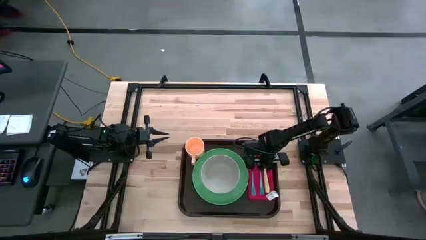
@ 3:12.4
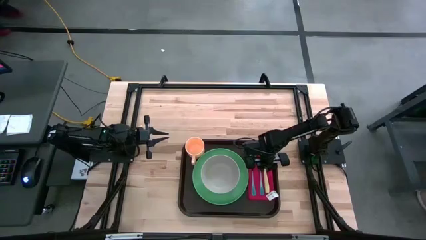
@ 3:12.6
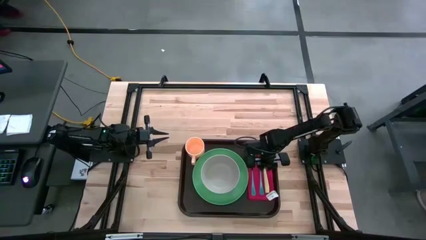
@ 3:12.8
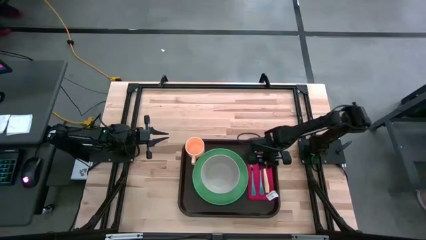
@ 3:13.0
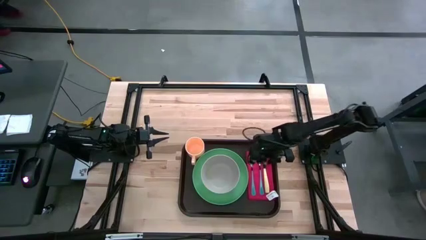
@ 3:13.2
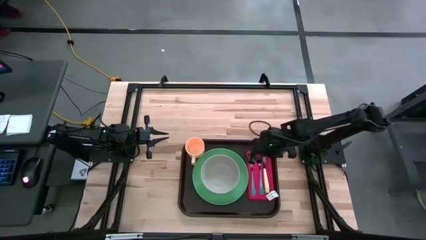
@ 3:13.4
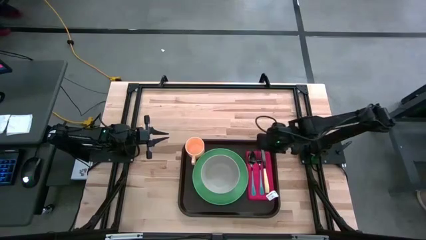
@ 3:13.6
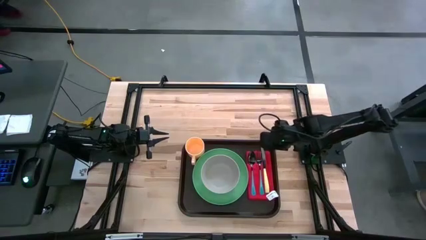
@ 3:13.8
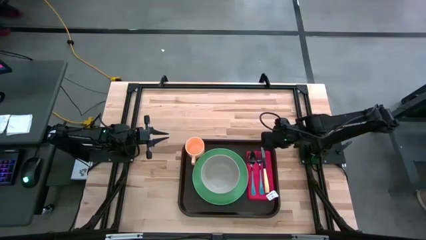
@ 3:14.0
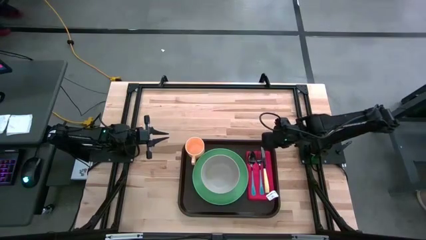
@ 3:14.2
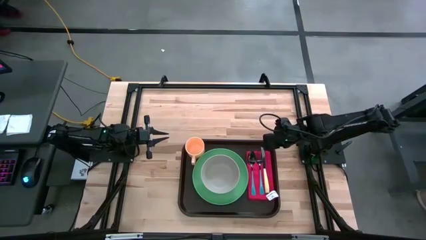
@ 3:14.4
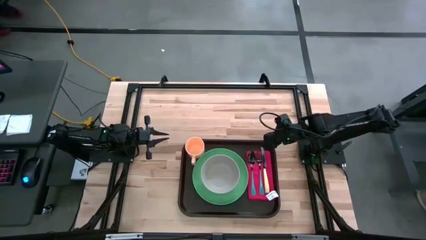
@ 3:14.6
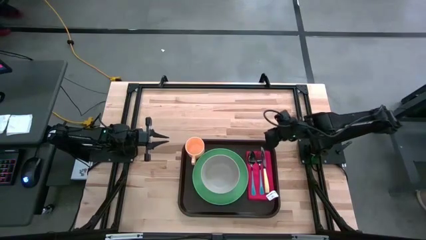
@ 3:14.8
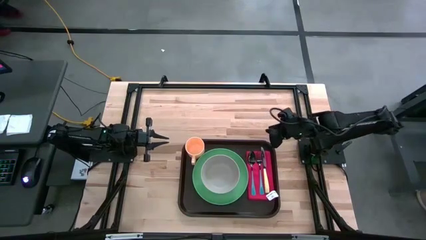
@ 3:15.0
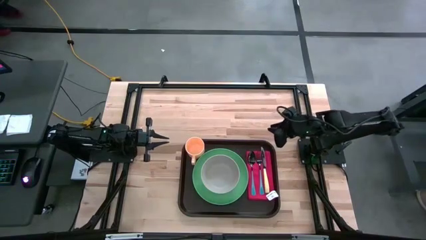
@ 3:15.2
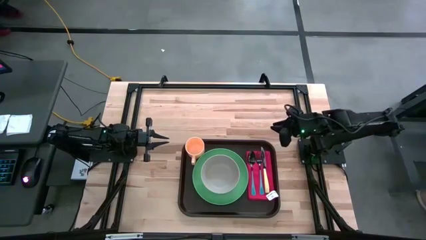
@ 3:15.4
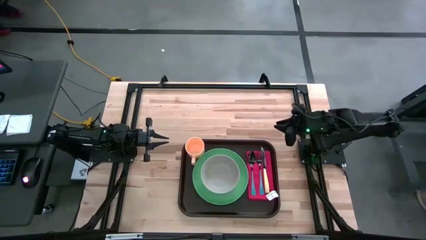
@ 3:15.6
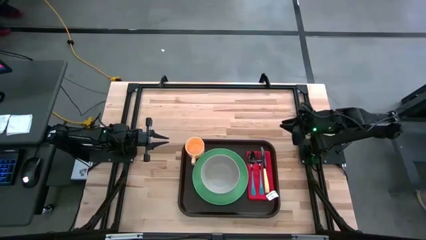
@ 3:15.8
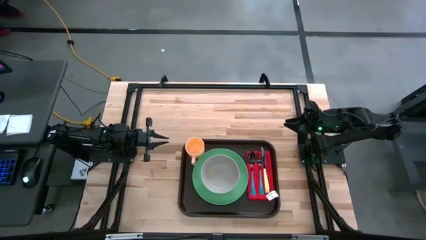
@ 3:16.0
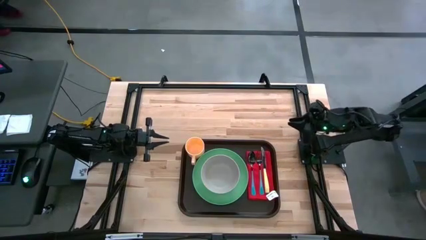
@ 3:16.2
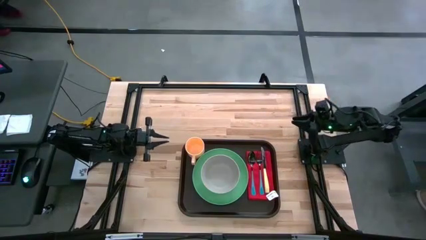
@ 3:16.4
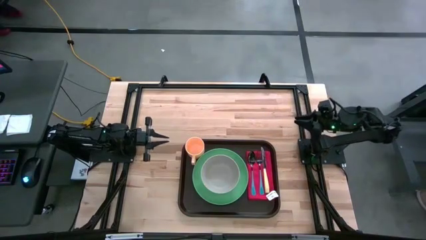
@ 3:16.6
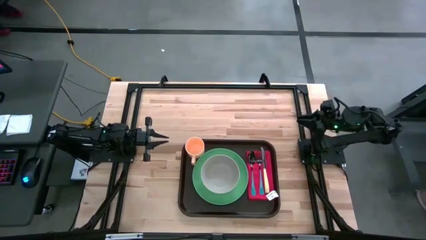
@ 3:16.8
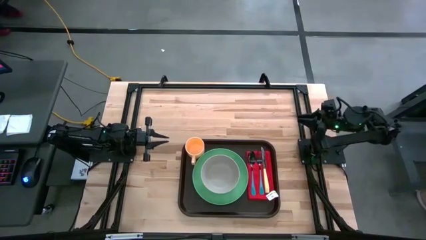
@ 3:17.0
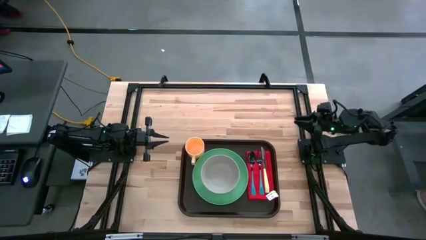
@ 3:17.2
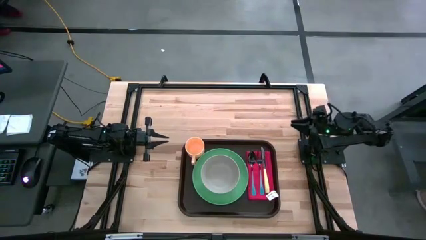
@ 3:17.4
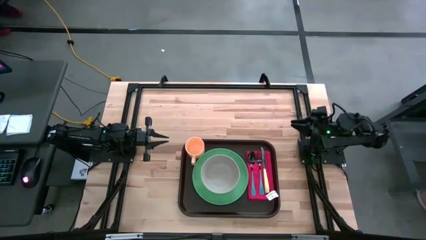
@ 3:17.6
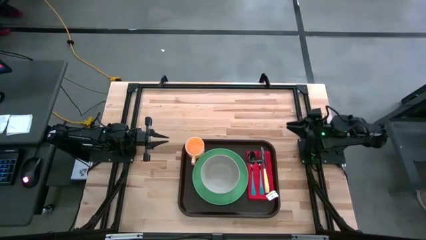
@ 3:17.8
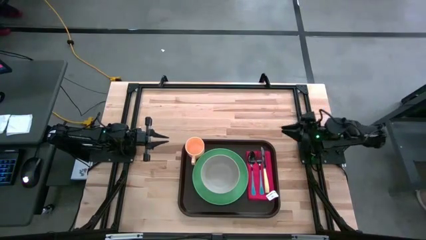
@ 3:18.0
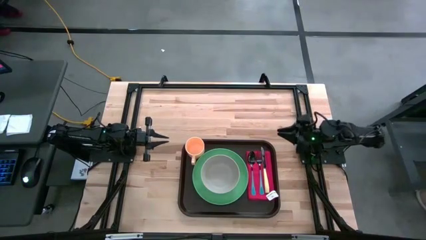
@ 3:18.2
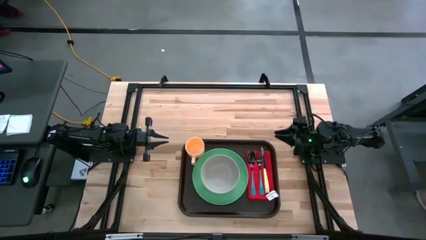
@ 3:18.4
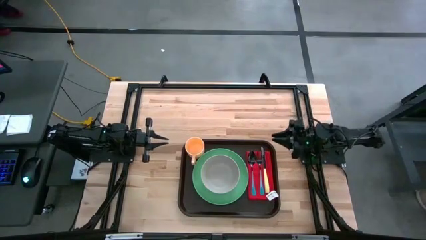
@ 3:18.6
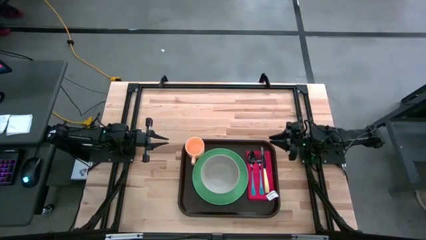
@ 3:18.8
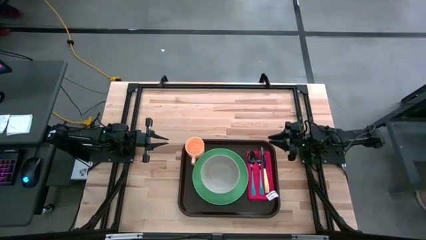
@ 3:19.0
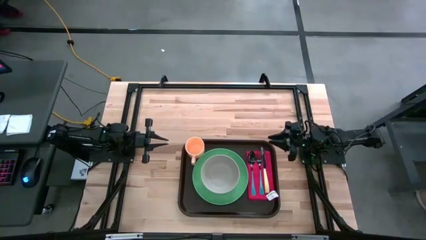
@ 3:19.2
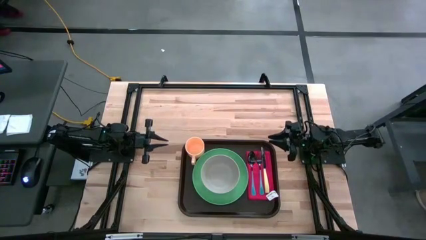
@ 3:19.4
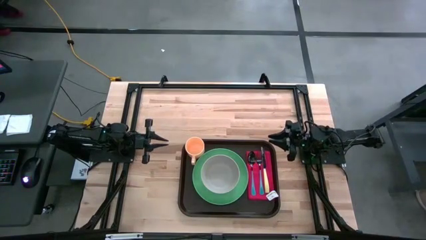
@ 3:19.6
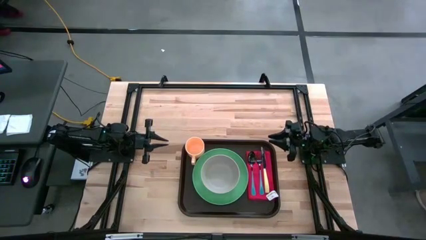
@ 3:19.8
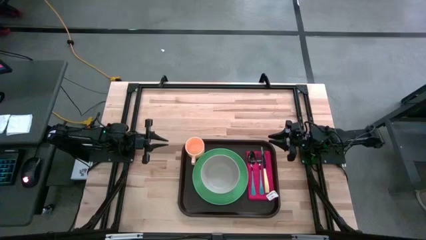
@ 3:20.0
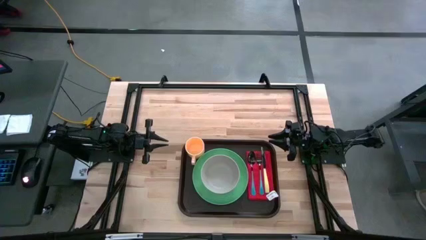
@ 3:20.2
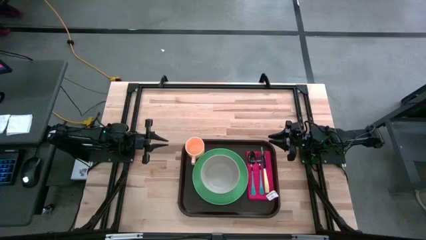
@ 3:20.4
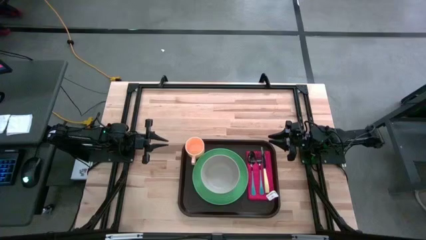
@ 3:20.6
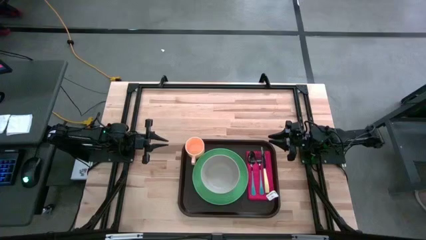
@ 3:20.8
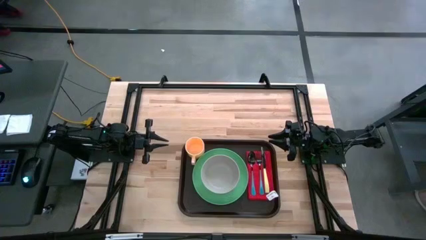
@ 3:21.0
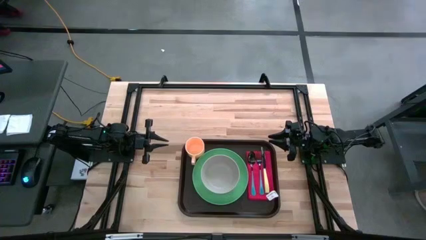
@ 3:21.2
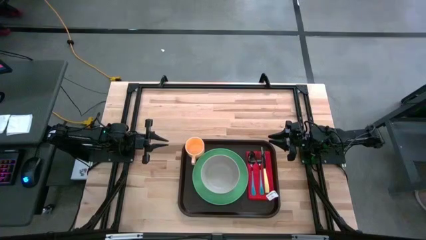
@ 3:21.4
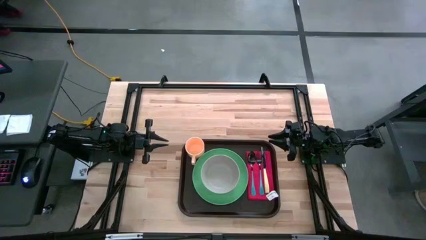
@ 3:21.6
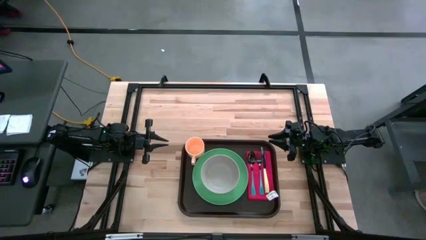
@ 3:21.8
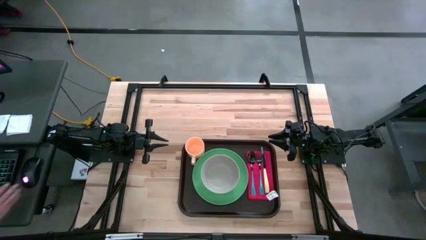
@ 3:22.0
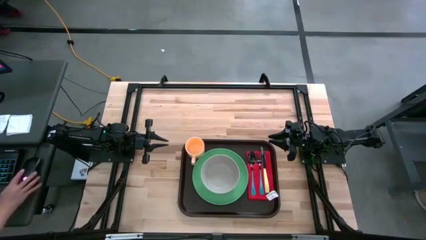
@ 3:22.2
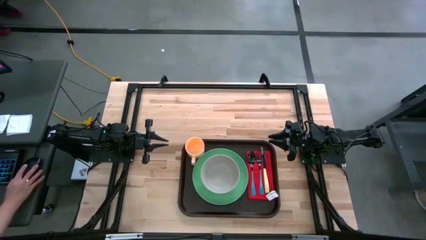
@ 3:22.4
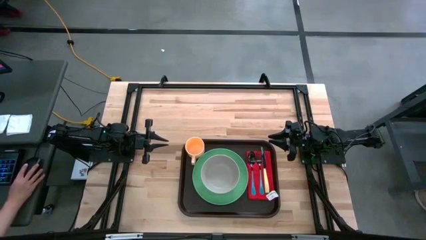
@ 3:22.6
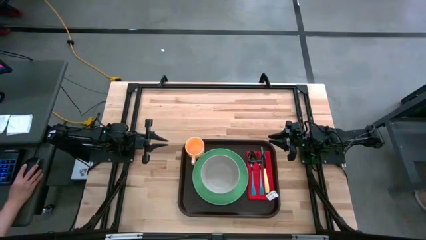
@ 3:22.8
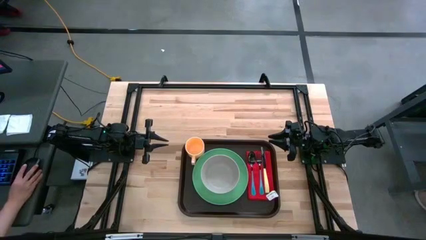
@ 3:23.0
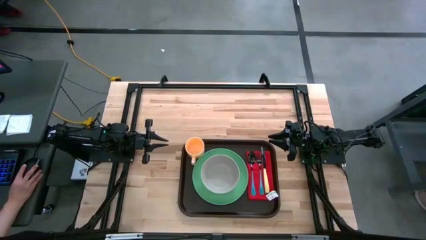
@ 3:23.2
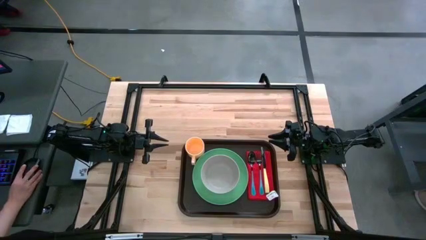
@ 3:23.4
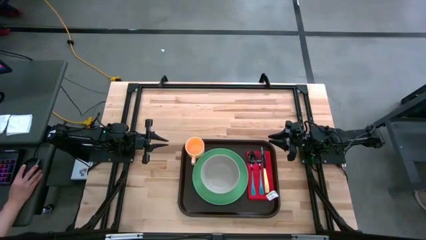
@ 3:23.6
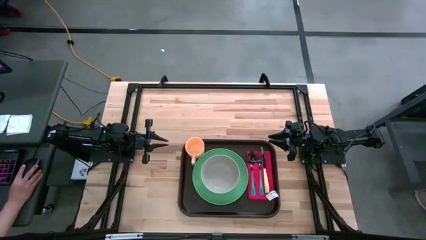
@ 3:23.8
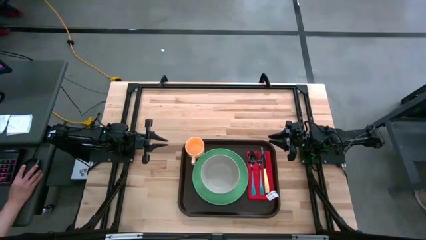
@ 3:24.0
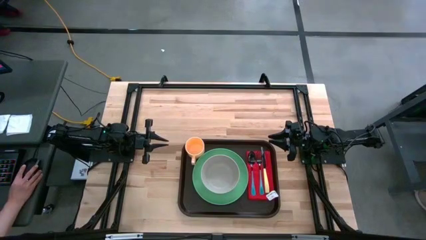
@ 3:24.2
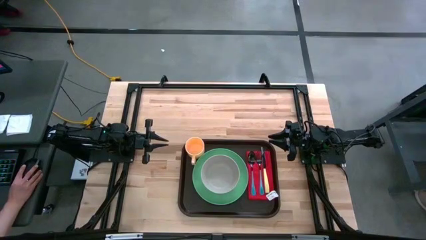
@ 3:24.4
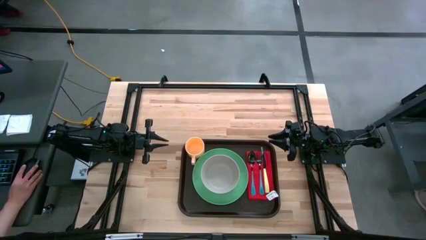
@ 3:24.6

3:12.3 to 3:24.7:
Task: Set up tray
Return to Home Position

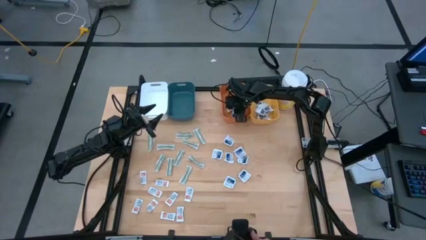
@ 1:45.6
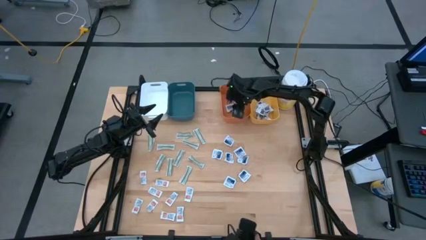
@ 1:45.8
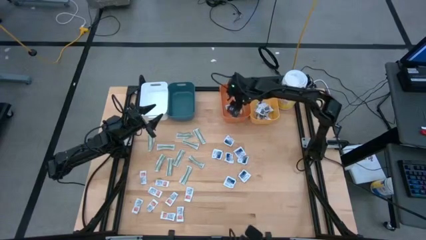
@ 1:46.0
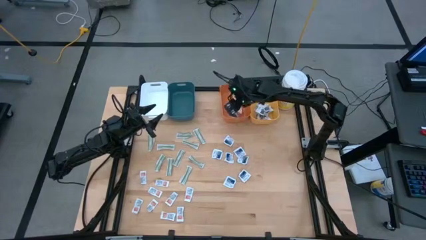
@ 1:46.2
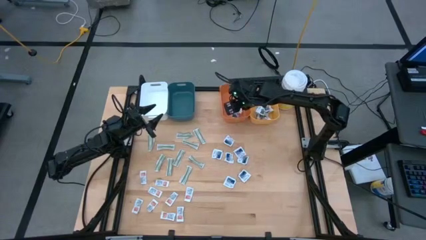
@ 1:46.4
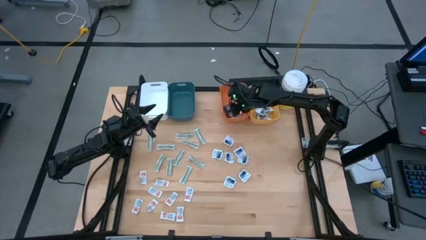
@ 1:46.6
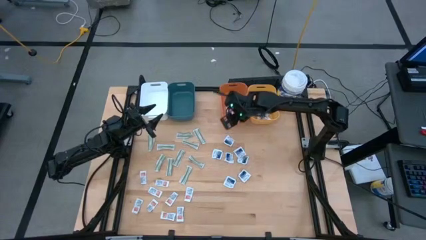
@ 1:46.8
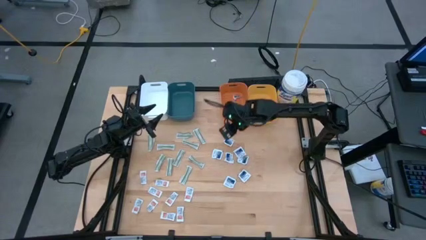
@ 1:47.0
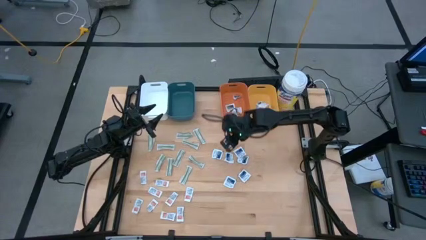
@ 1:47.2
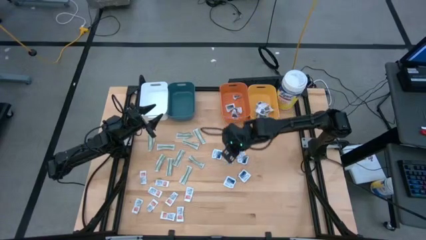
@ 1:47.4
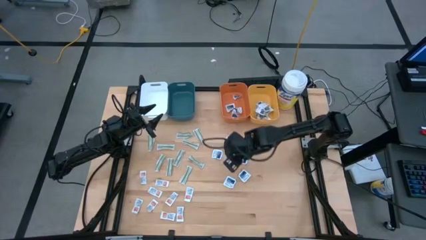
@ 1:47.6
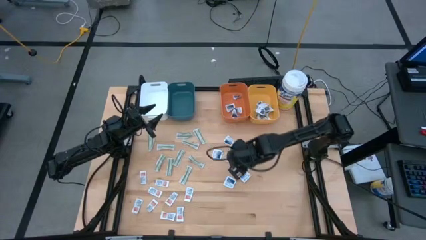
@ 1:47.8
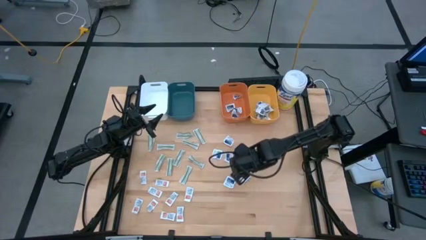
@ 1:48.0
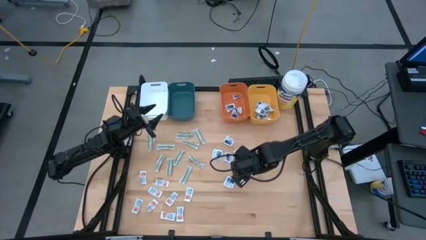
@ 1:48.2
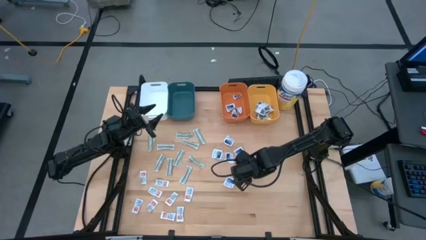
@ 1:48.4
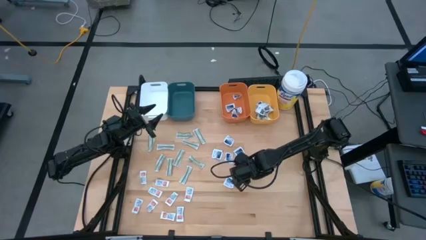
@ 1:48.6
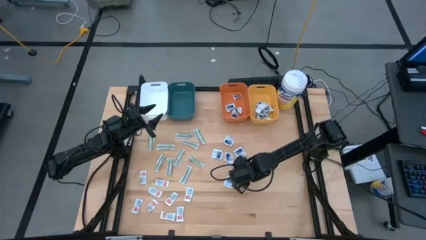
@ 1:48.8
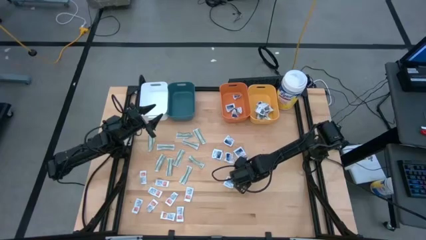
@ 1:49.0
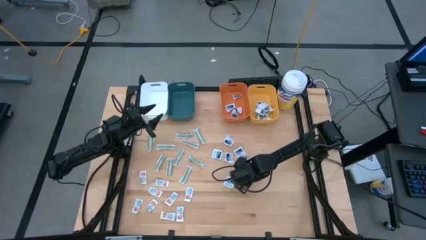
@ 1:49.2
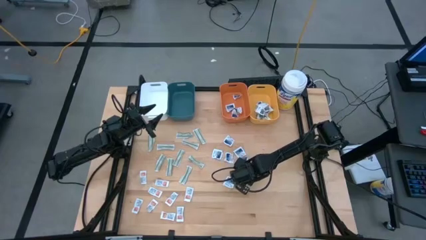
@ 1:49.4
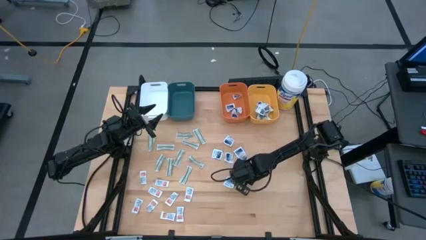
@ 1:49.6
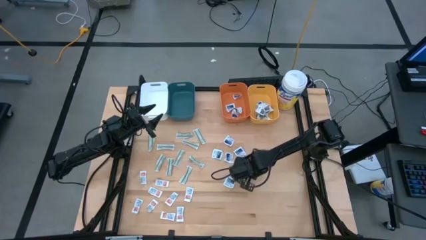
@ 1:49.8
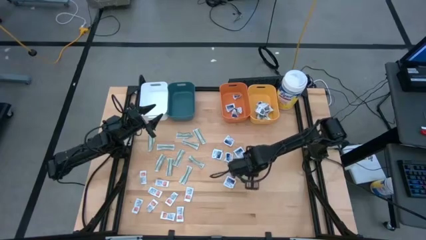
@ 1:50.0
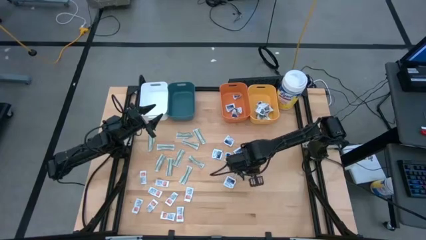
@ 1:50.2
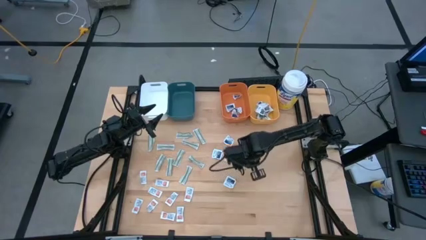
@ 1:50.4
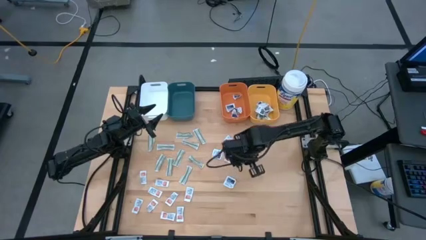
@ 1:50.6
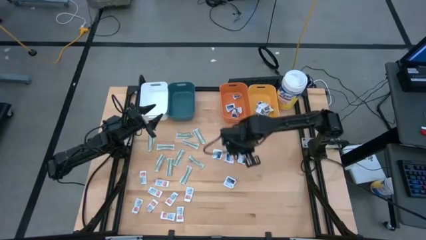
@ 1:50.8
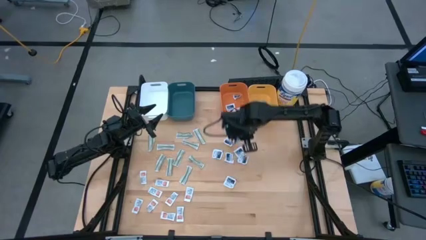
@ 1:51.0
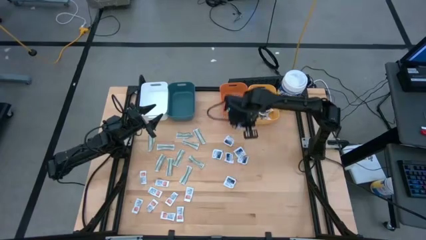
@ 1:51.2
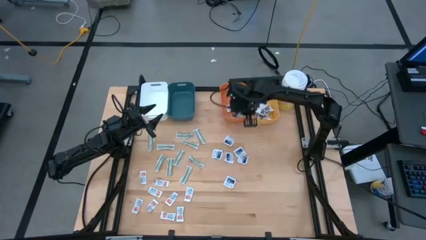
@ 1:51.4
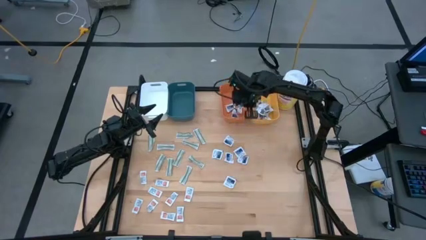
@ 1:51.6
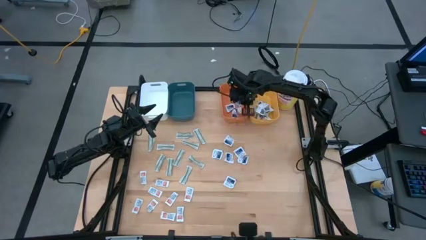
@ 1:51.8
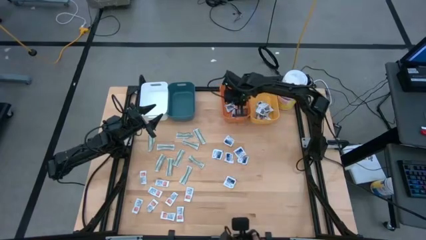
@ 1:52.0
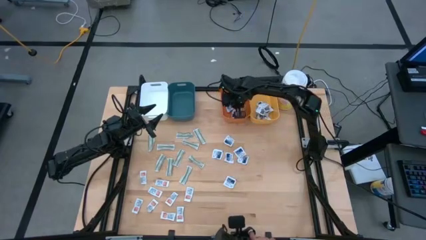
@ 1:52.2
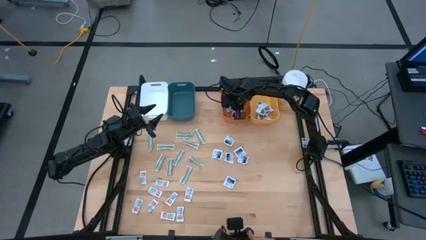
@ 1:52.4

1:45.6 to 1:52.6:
Task: Pick & Place First Aid Supplies
Put the alcohol pad into the orange bin
